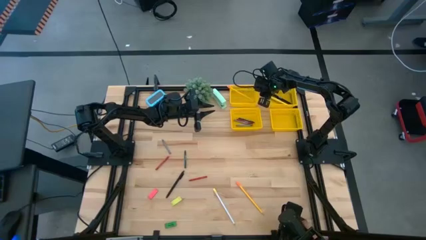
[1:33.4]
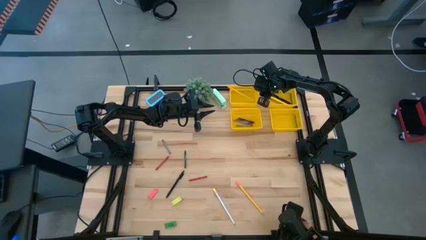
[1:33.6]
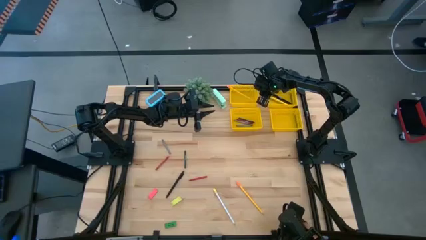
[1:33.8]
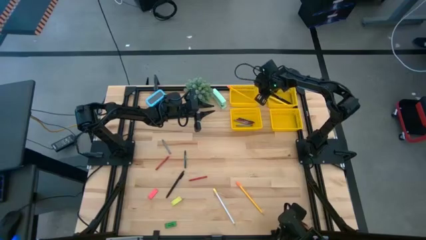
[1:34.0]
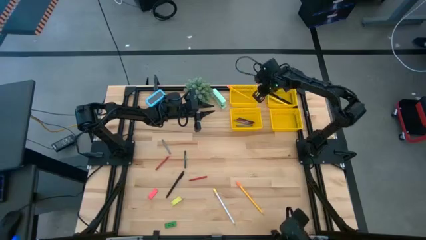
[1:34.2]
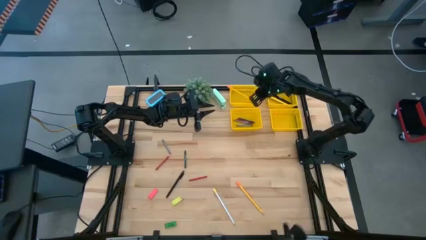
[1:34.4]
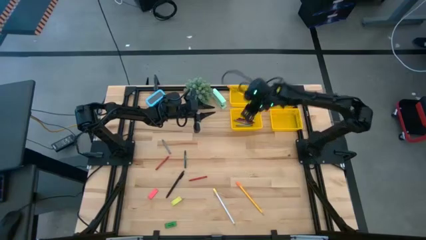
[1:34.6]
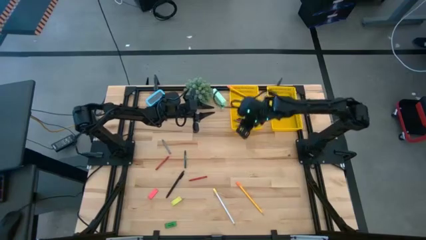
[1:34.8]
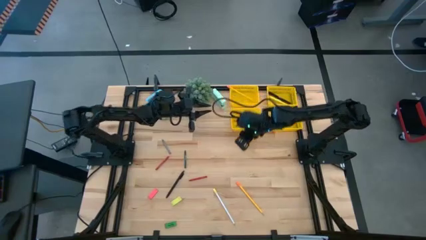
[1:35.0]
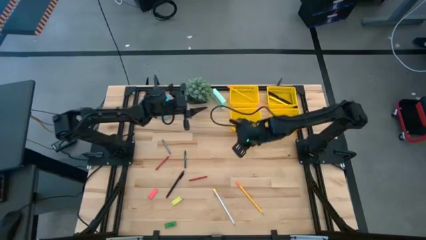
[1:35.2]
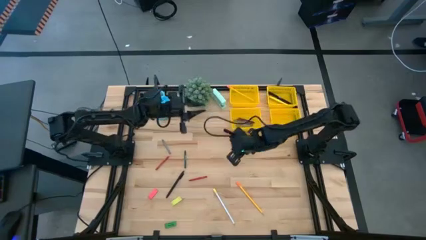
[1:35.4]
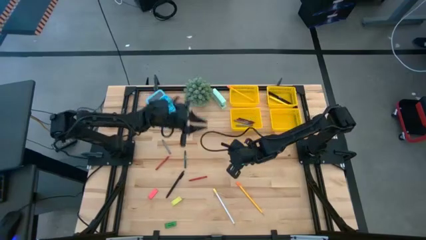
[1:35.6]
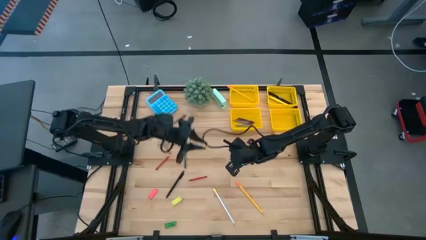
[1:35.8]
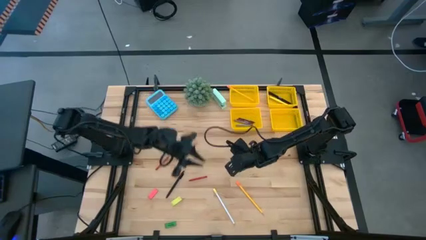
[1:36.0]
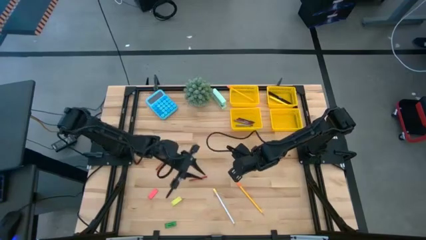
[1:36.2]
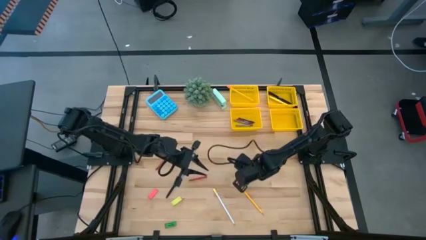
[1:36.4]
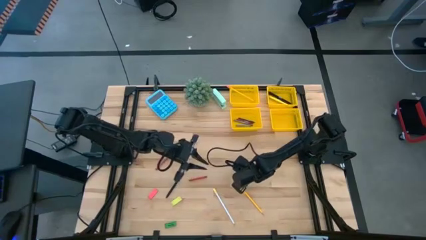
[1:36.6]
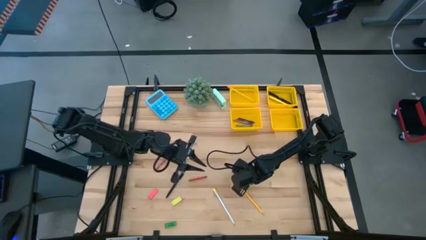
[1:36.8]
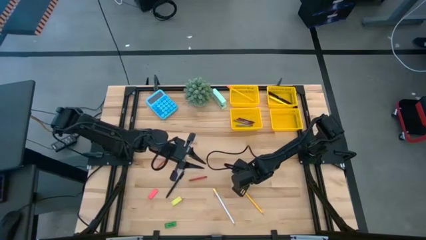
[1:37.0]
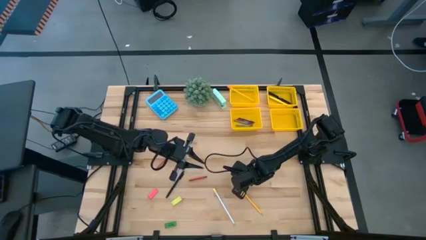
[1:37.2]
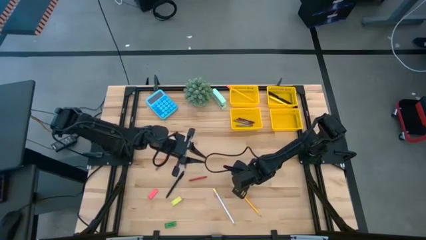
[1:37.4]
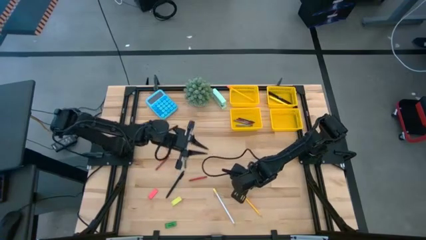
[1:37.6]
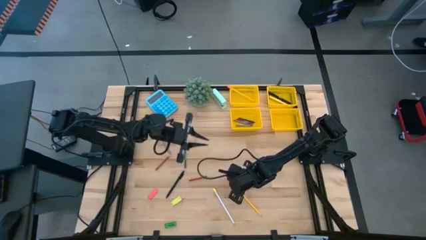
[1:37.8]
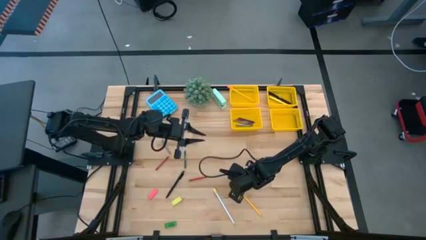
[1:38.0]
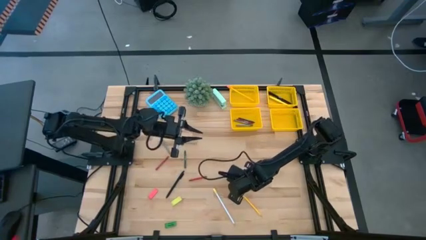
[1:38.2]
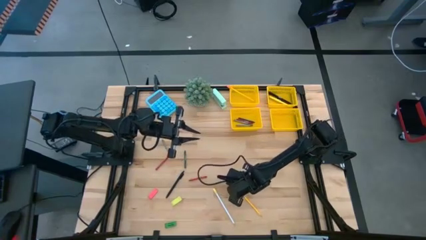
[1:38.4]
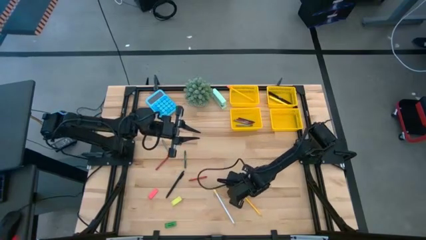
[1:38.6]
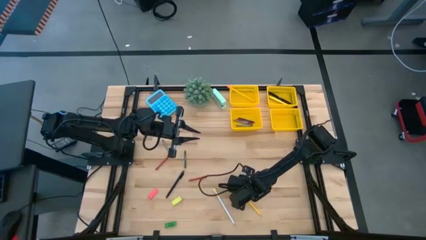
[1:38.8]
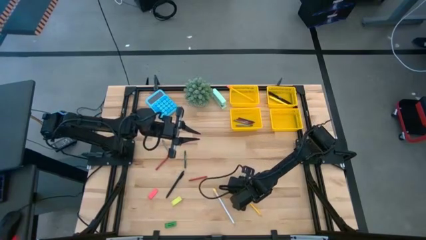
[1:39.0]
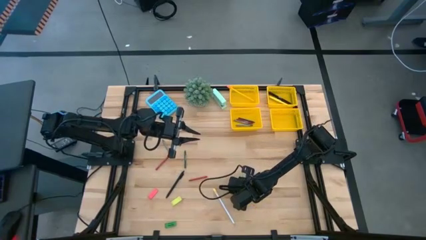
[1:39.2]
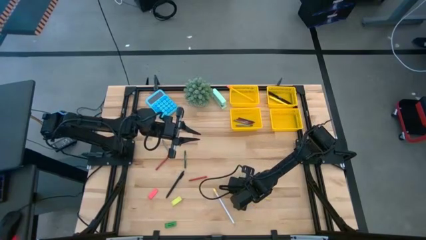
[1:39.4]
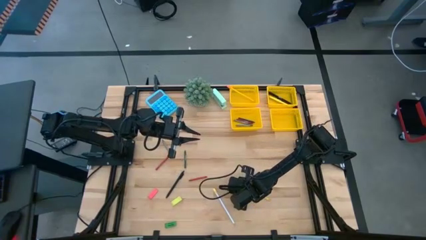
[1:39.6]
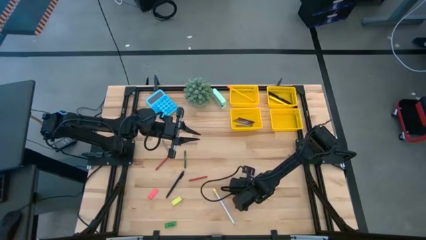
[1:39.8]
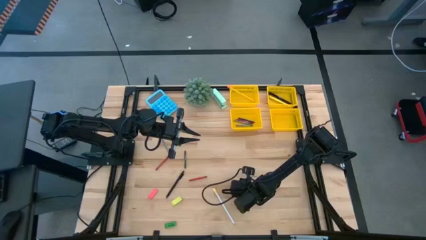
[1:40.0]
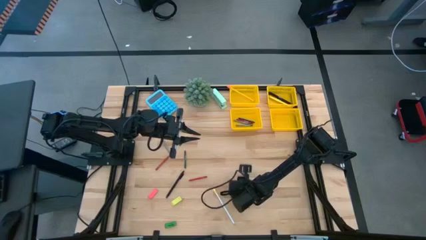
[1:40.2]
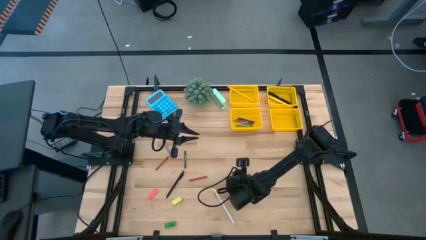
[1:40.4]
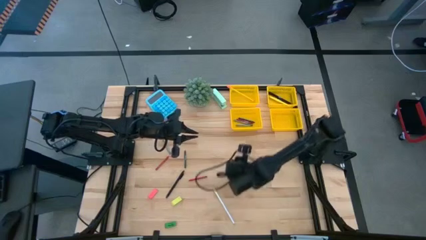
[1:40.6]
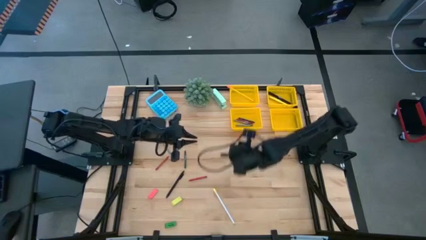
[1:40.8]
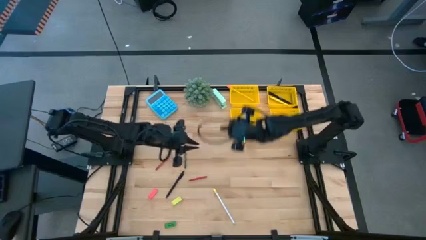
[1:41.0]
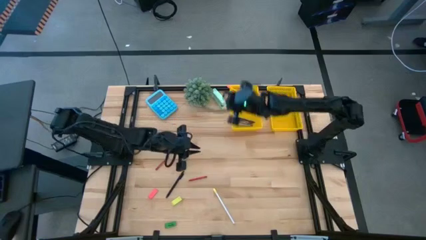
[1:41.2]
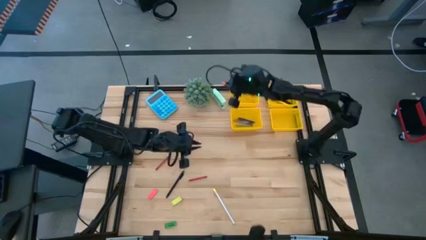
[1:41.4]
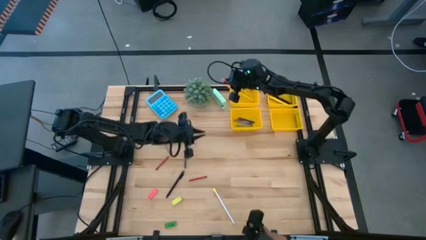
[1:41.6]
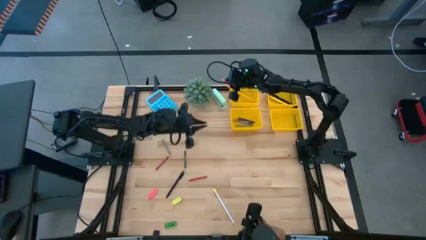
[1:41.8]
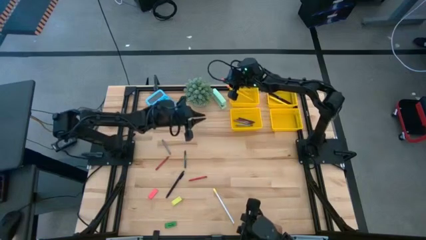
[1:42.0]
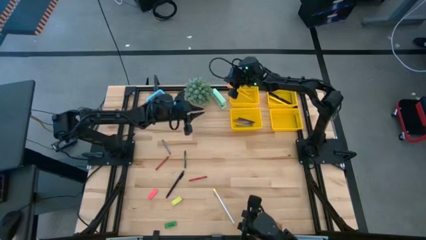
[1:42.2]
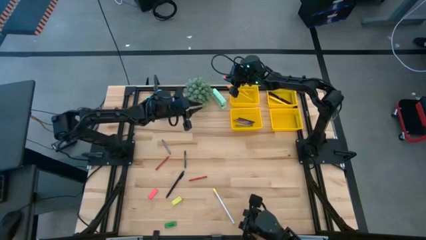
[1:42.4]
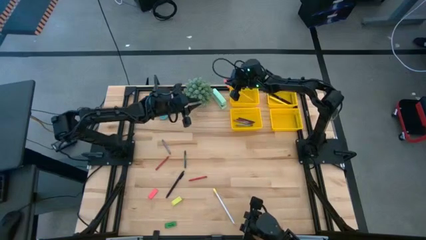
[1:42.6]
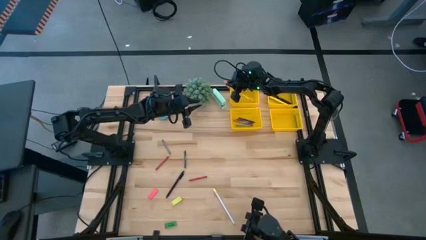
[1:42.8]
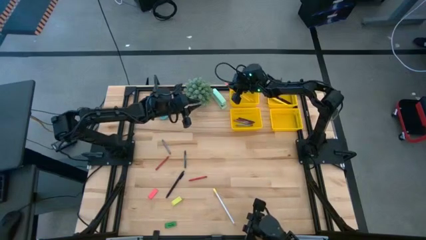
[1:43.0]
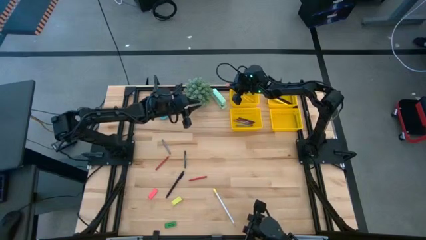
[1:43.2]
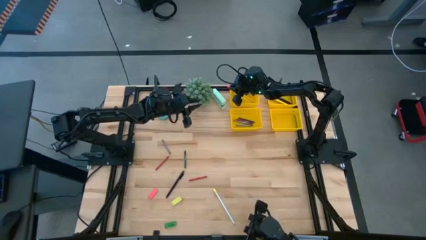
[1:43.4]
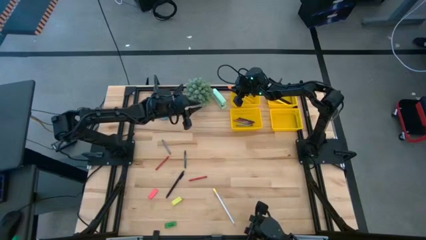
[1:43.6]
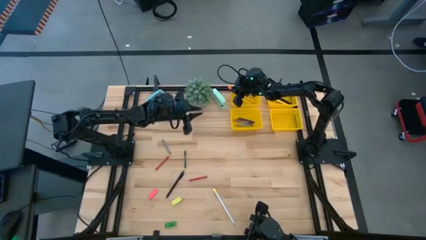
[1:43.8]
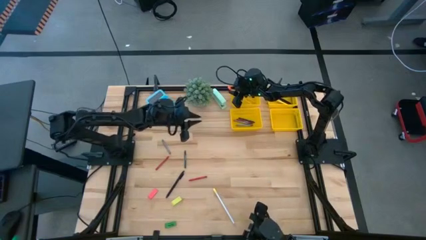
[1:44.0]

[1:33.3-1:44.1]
Task: Sort crayons/erasers/pens/pencils in bins
Put the yellow pencil into the top left yellow bin
